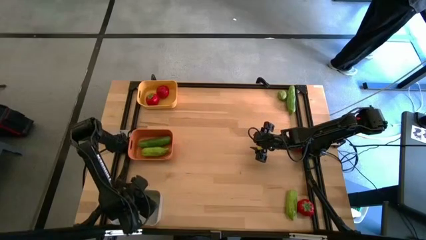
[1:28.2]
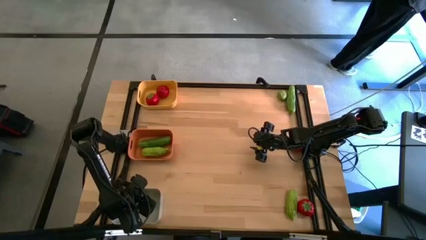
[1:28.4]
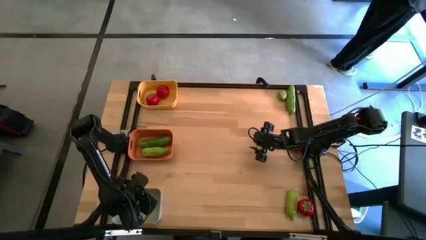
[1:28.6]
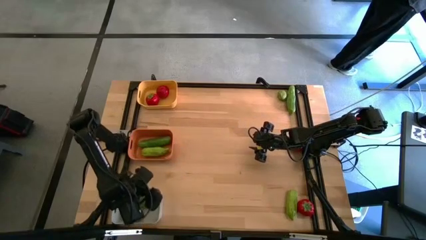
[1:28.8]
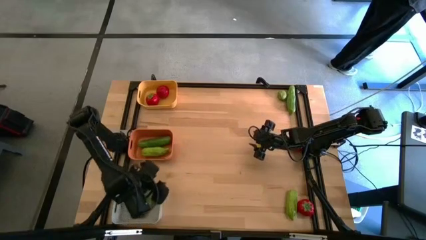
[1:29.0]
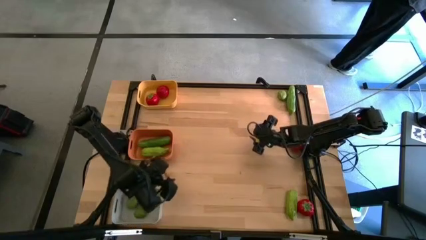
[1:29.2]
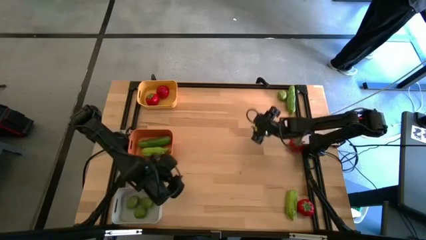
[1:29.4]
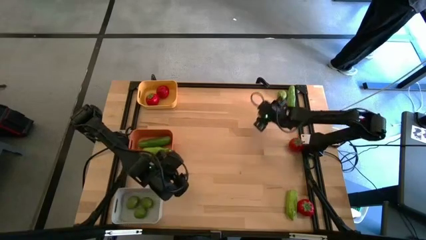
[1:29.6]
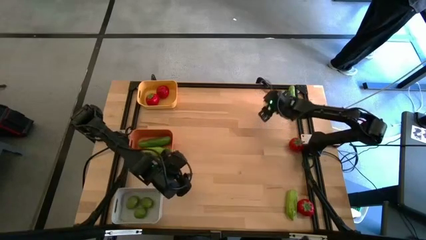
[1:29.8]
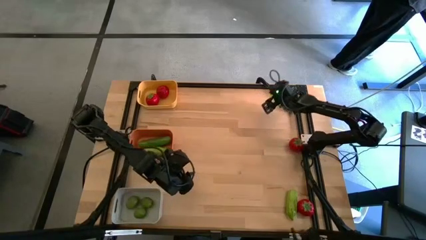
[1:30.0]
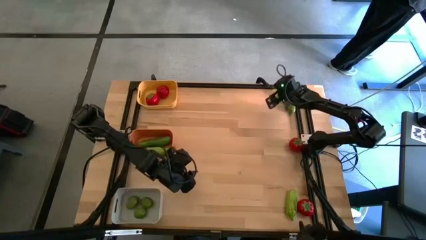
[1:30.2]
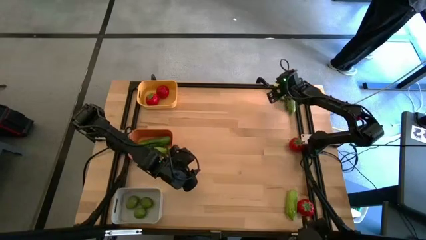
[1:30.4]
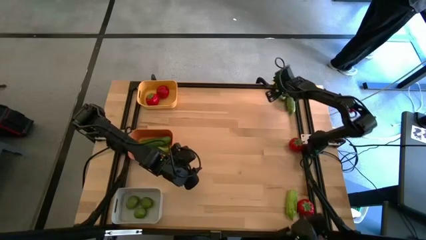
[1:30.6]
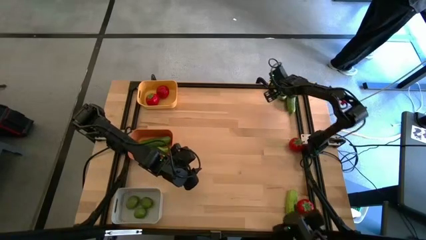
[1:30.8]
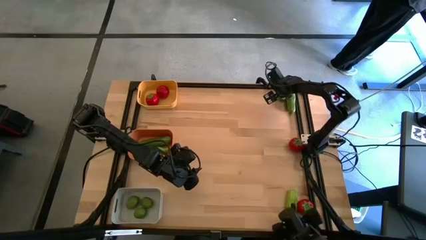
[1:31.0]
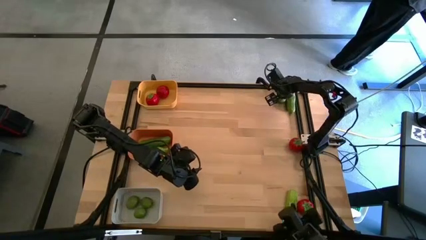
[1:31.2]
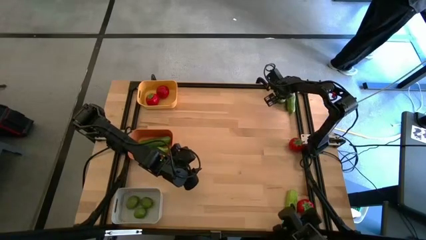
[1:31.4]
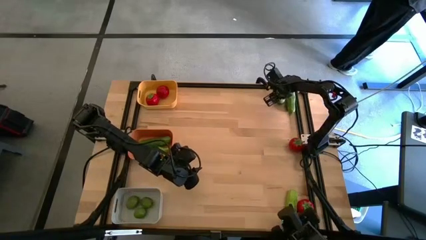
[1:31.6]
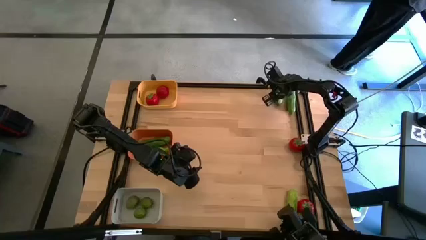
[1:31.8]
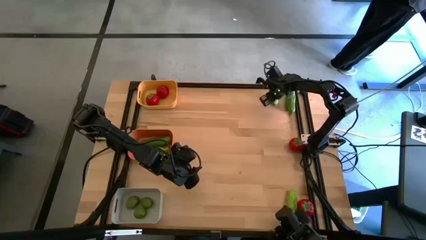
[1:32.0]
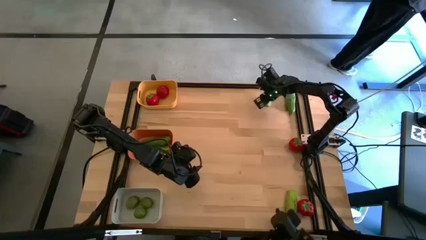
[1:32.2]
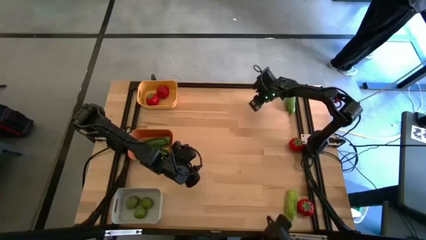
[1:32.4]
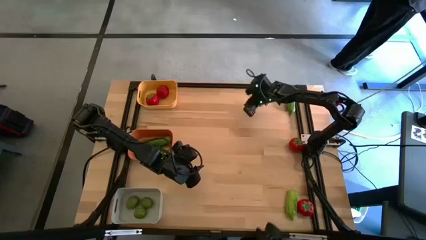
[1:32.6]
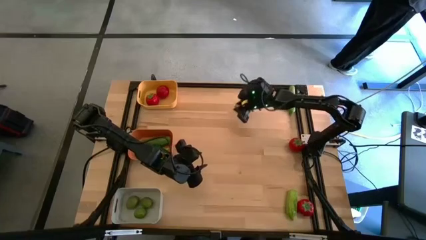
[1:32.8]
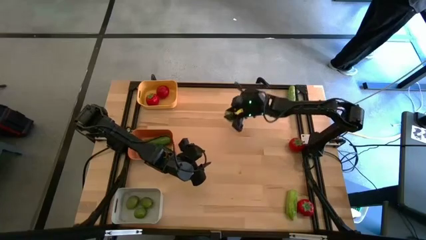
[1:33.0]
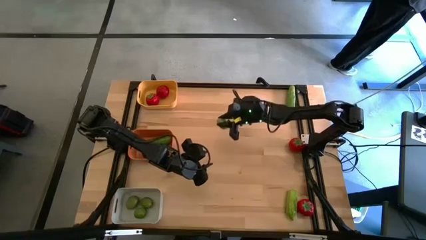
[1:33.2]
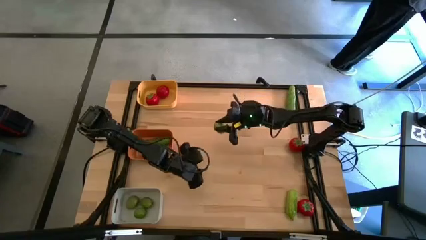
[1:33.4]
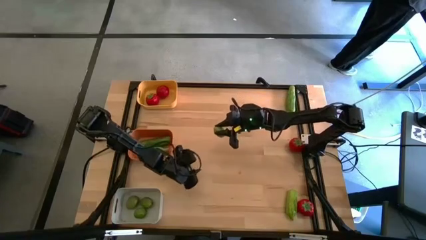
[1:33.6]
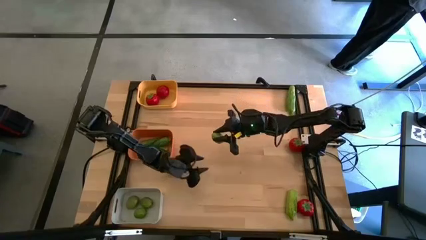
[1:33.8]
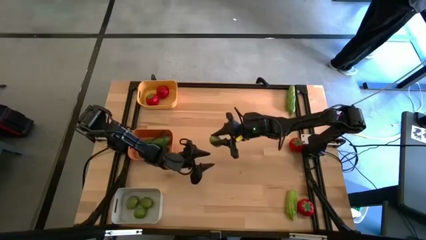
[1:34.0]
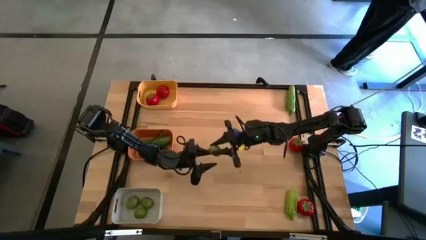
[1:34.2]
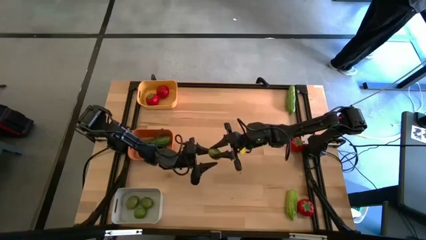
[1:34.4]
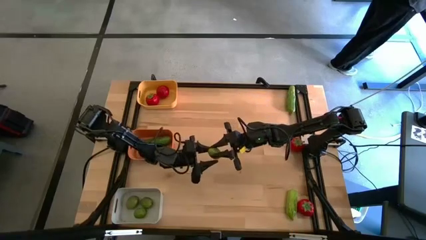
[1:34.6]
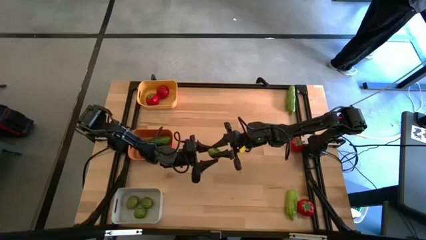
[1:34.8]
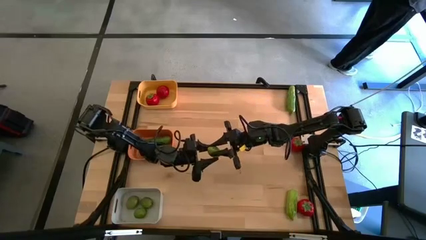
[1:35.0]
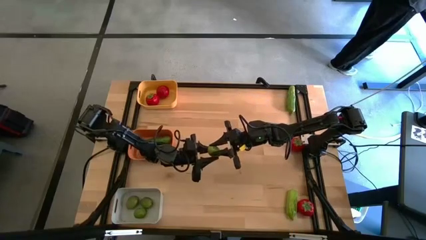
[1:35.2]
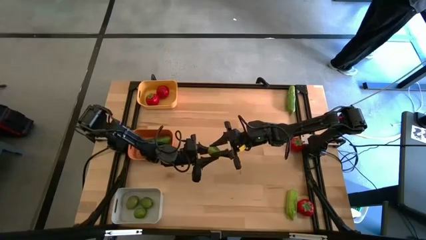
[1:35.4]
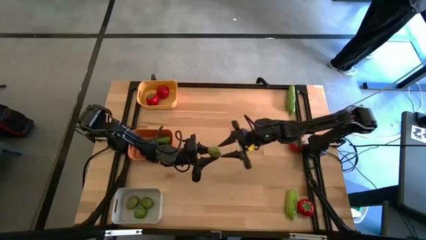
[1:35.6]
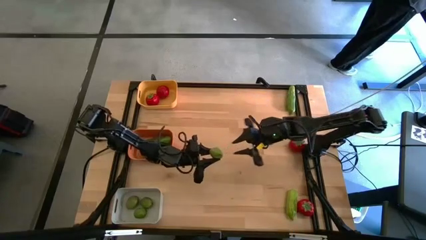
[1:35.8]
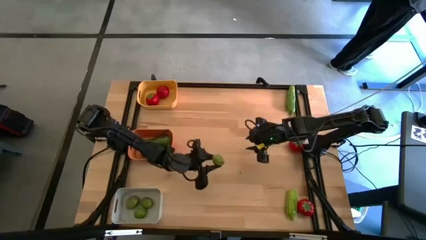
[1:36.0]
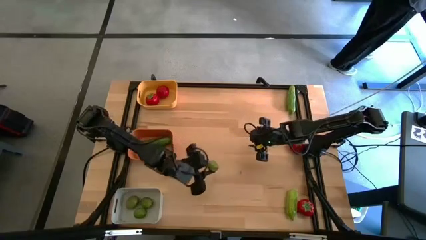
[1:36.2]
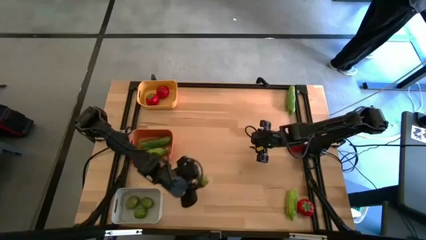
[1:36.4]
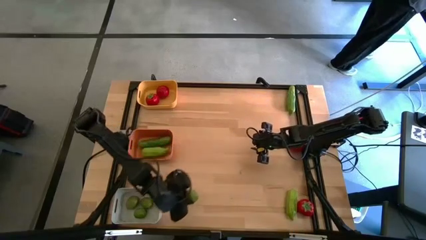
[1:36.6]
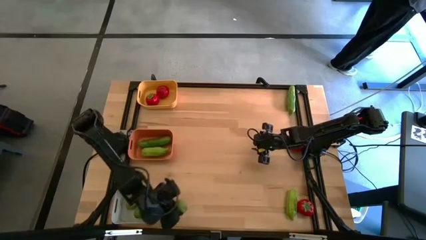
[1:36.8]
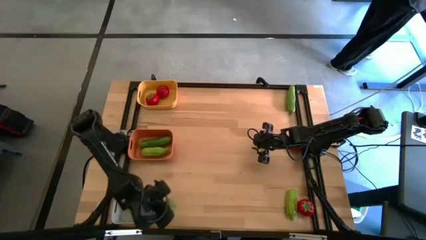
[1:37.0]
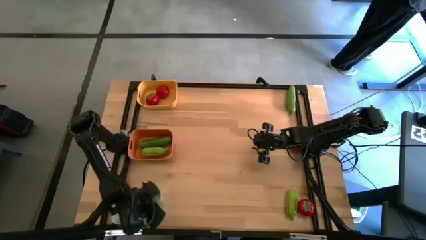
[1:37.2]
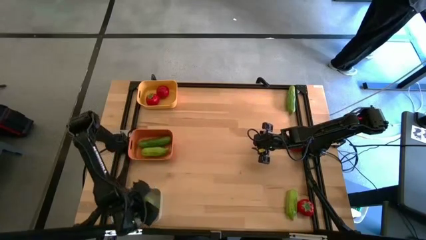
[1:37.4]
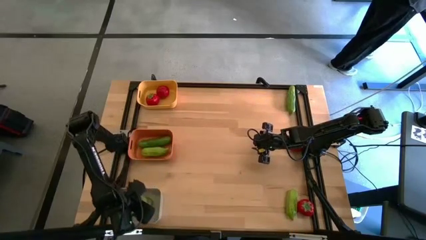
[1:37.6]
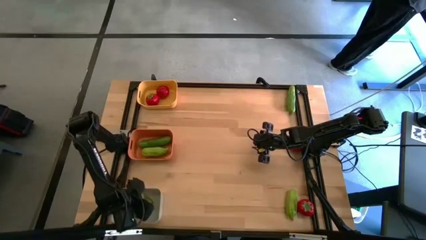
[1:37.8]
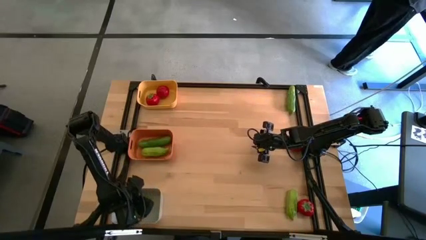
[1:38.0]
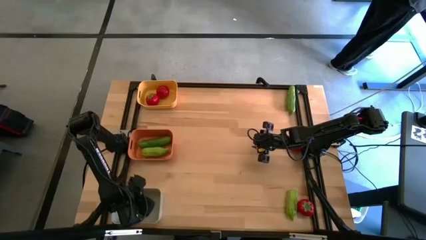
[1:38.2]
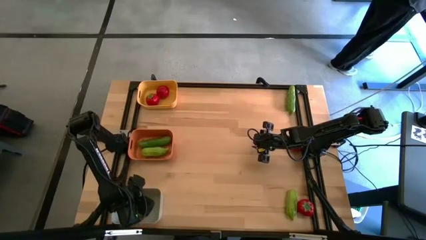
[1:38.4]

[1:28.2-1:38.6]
Task: Sort produce into baskets
Put the lime into the gray bin

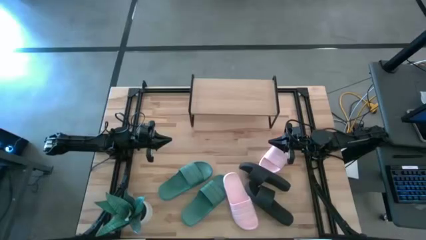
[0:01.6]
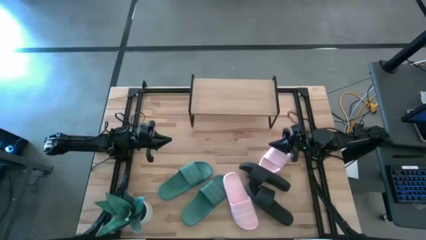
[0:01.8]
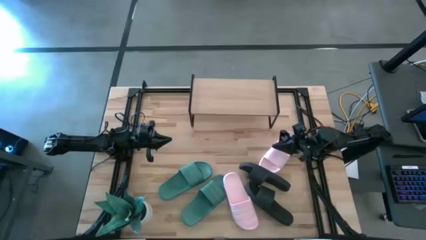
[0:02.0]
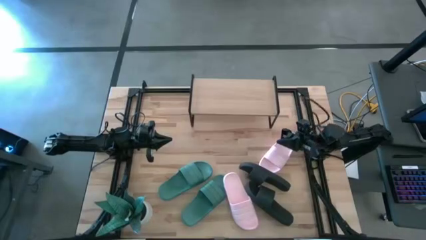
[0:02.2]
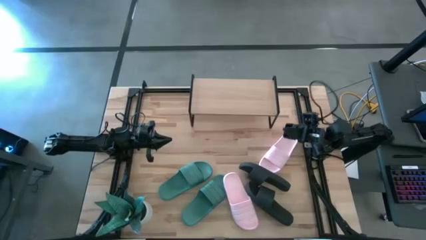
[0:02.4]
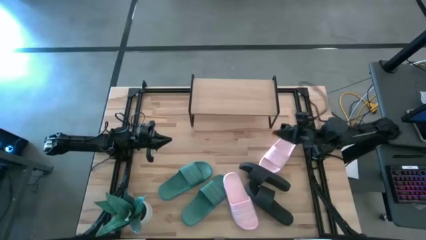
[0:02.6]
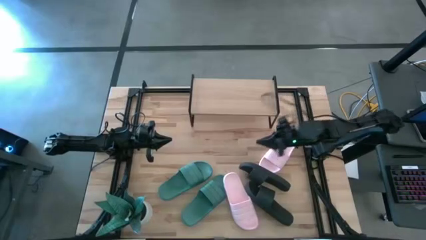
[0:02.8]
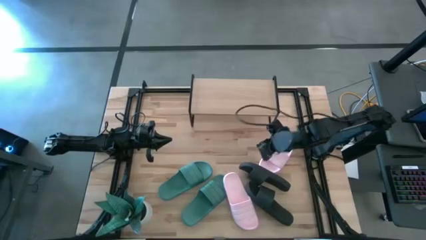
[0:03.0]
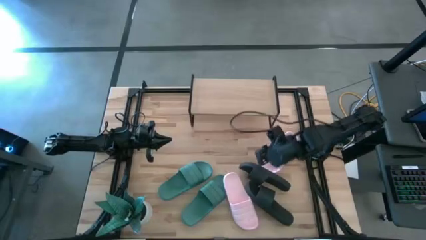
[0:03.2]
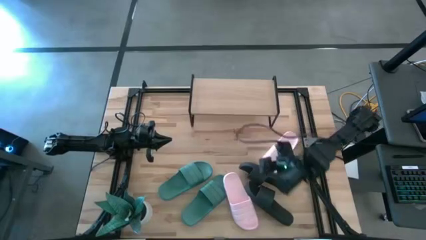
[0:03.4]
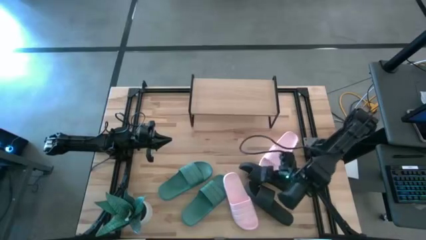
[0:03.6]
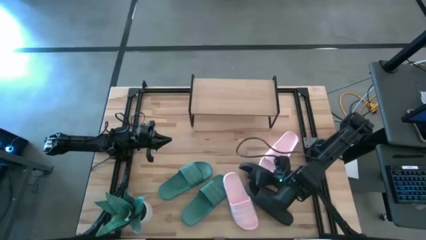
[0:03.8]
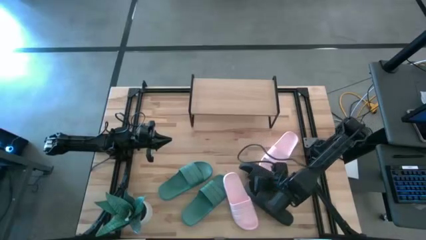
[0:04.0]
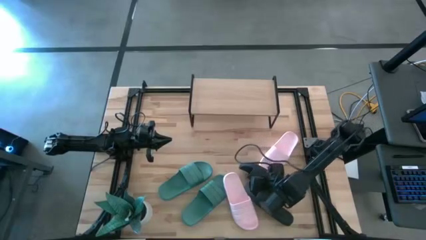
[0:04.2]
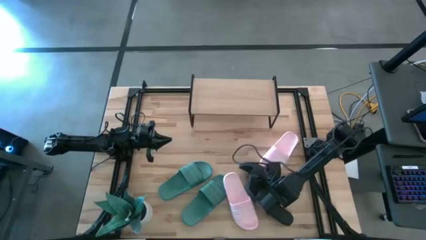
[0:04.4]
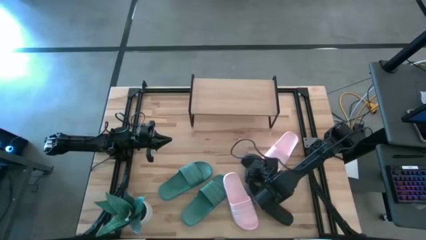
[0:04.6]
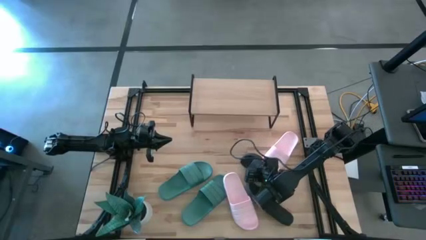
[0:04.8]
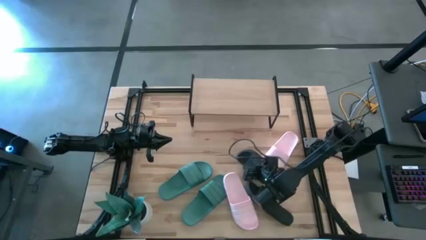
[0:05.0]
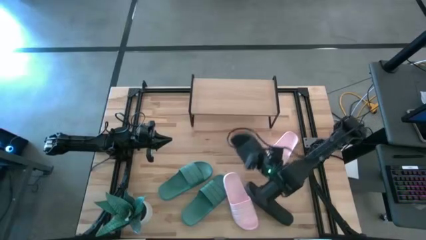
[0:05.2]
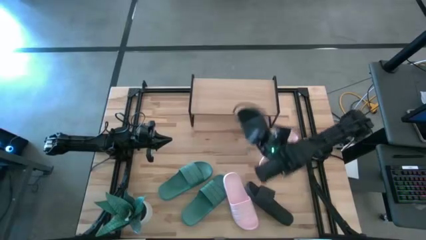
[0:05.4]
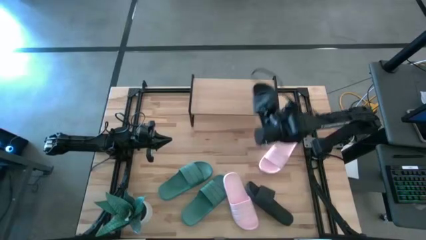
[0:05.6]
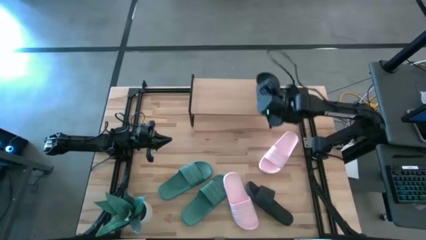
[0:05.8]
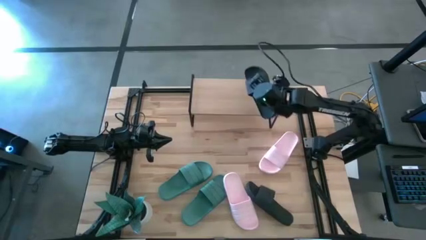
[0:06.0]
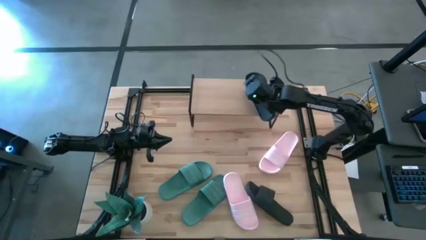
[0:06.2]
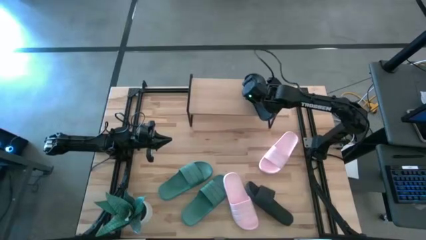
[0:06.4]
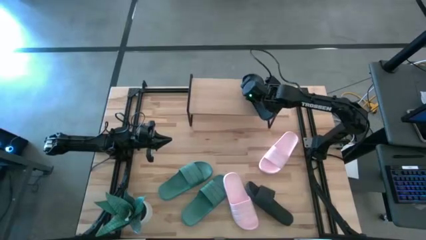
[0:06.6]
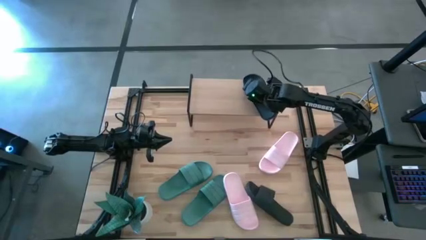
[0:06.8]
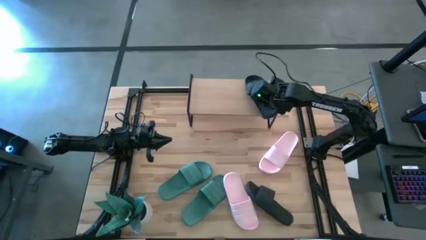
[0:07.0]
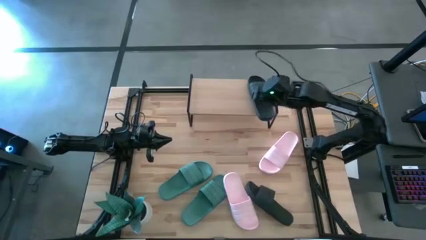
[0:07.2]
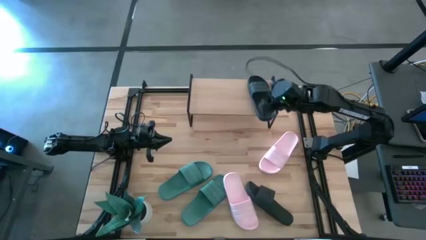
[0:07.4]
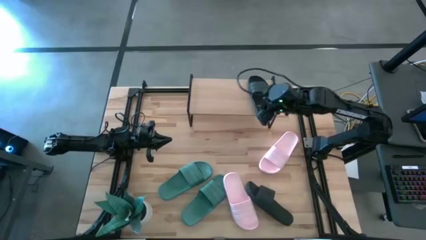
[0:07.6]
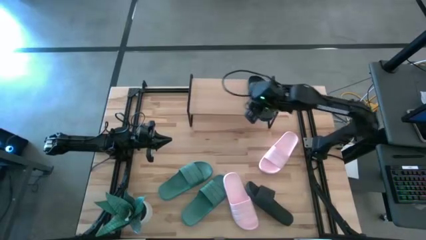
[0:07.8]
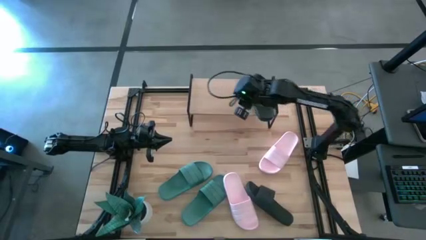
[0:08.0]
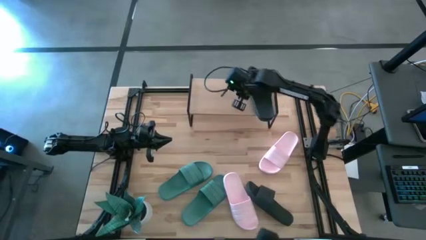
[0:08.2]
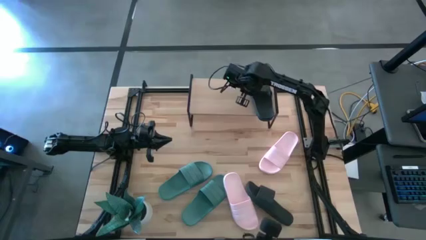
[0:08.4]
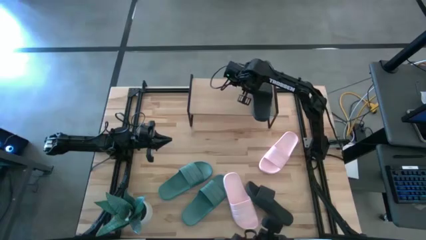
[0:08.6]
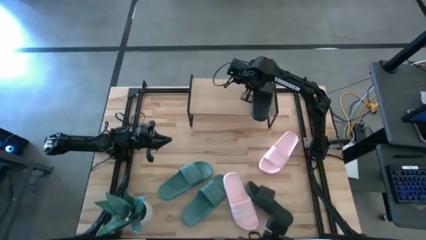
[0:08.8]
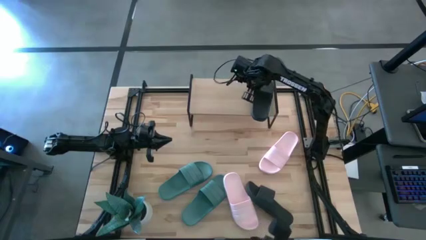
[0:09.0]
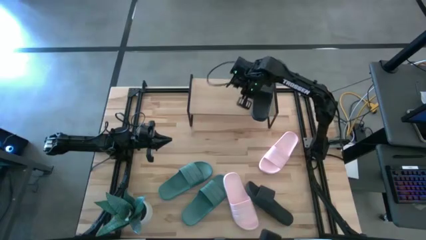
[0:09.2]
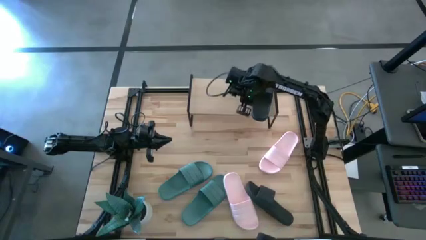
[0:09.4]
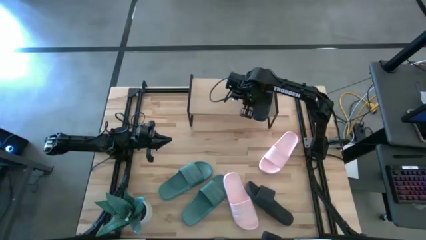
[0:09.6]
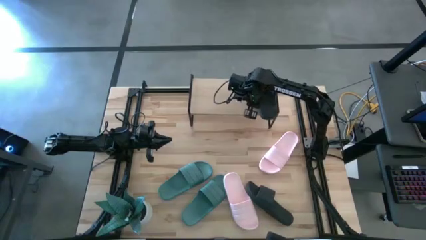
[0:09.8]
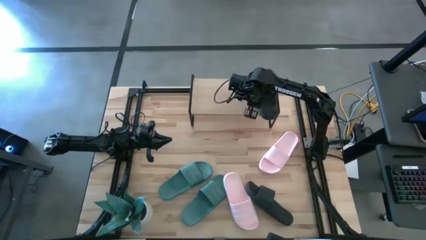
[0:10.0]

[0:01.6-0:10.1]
Task: Pick and place slides into the shelf
Put the top black slipper onto the shelf
